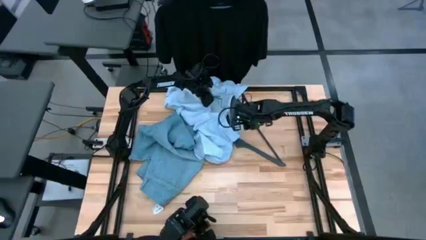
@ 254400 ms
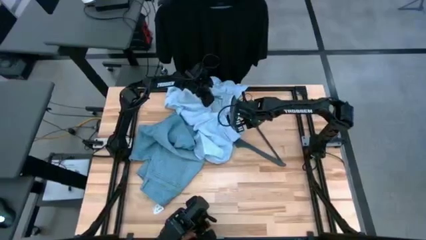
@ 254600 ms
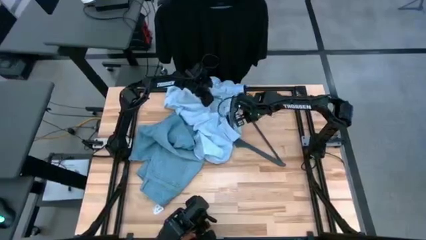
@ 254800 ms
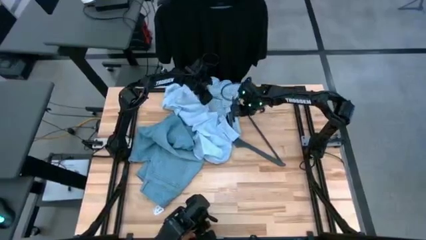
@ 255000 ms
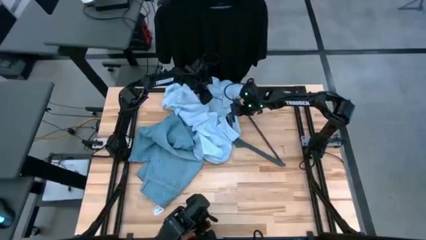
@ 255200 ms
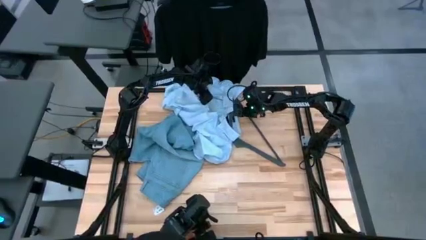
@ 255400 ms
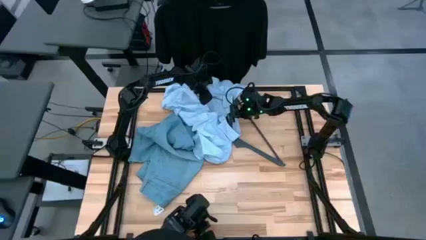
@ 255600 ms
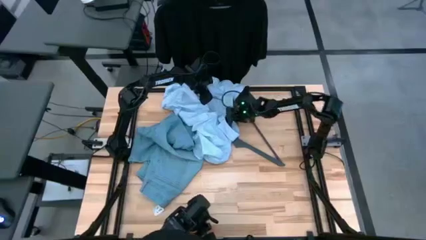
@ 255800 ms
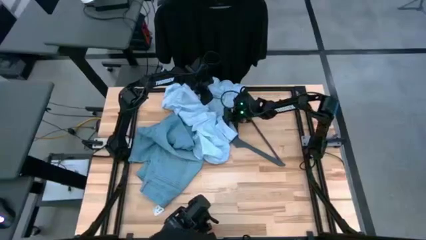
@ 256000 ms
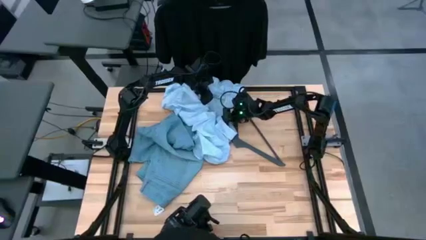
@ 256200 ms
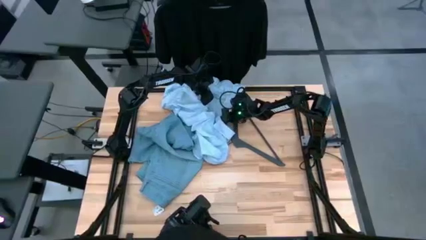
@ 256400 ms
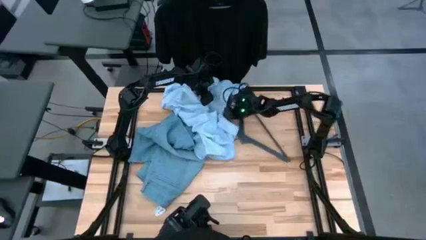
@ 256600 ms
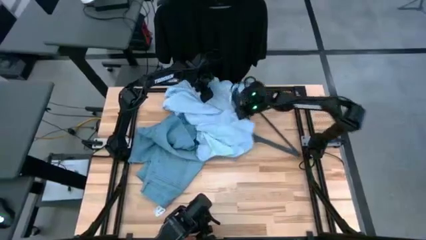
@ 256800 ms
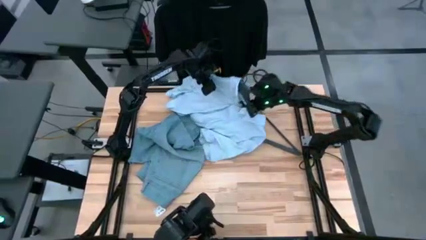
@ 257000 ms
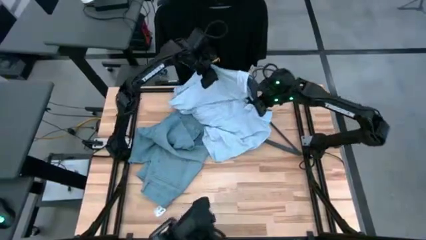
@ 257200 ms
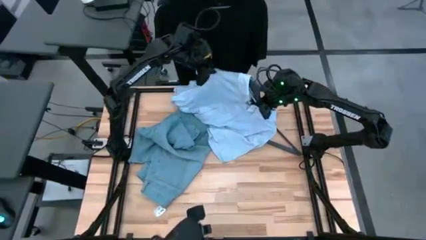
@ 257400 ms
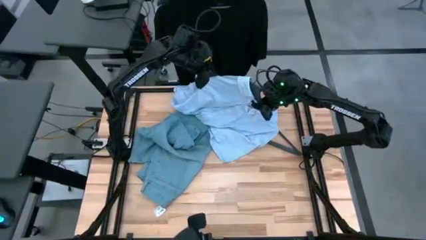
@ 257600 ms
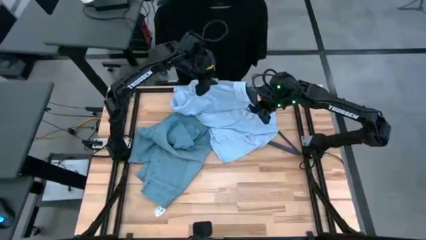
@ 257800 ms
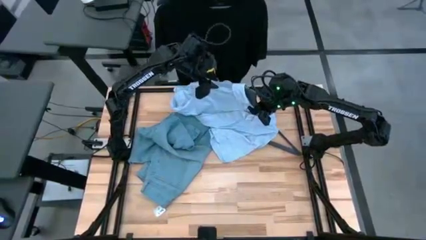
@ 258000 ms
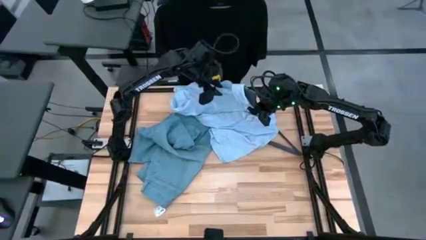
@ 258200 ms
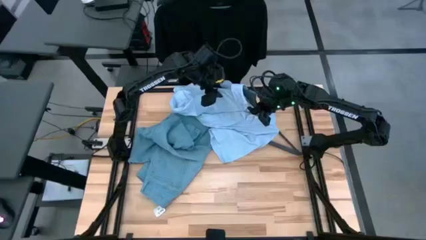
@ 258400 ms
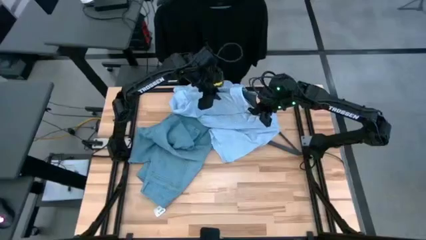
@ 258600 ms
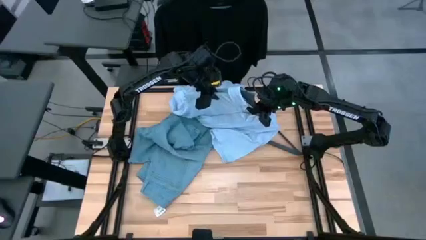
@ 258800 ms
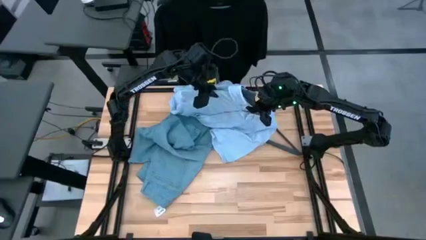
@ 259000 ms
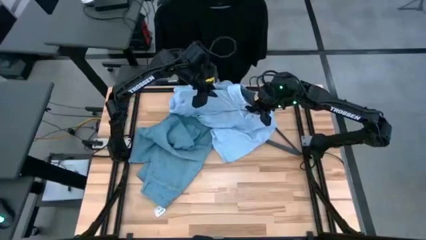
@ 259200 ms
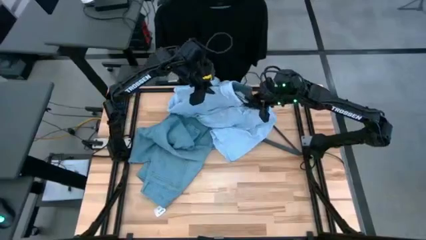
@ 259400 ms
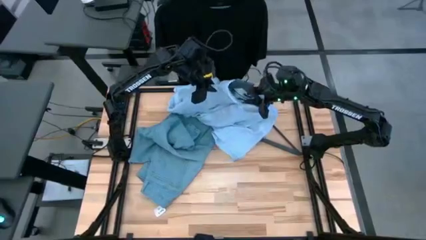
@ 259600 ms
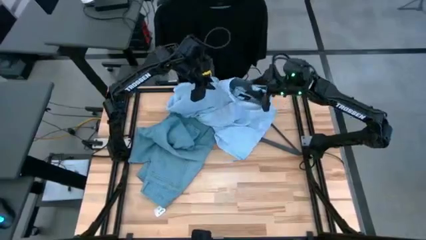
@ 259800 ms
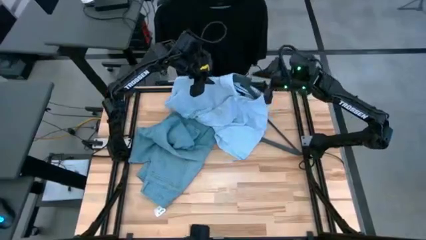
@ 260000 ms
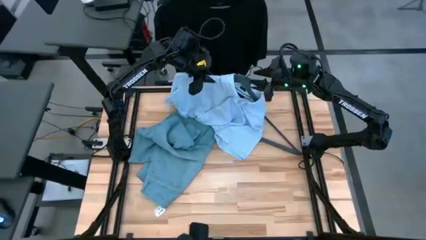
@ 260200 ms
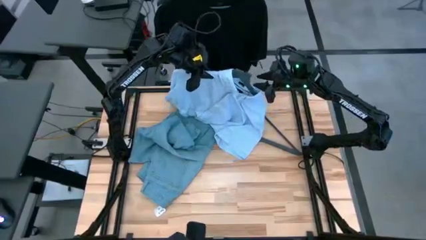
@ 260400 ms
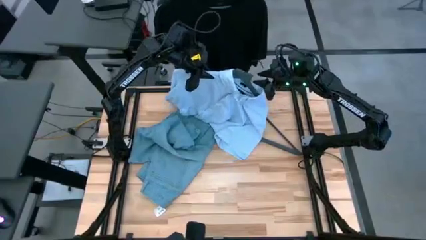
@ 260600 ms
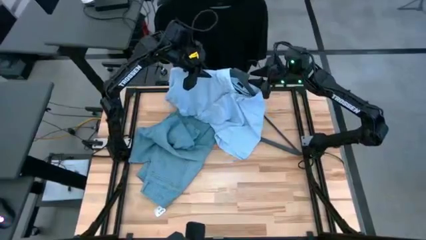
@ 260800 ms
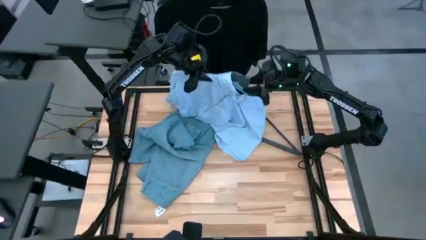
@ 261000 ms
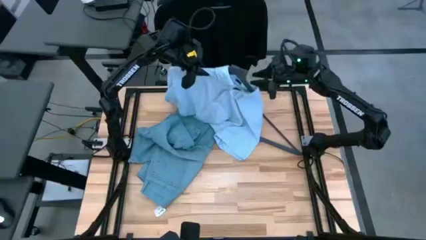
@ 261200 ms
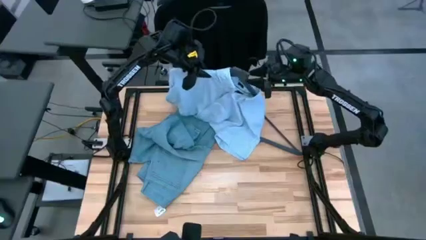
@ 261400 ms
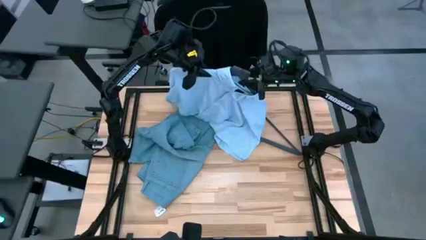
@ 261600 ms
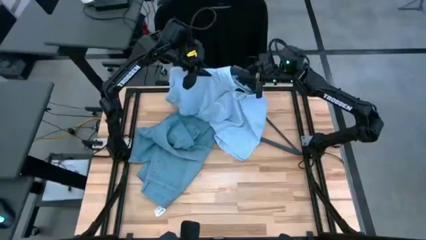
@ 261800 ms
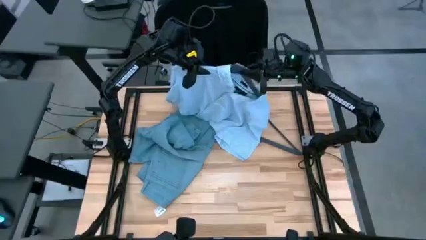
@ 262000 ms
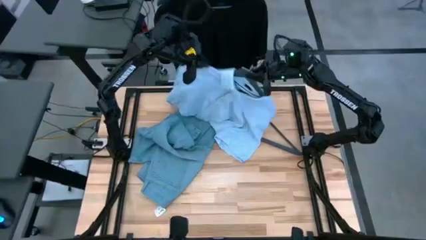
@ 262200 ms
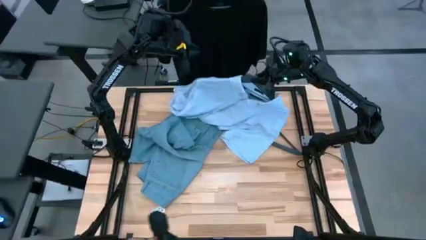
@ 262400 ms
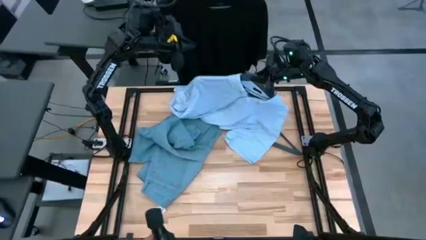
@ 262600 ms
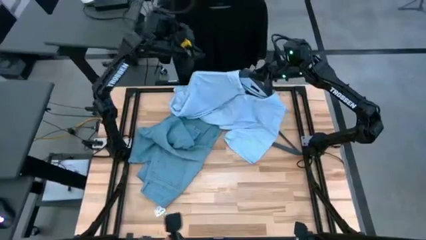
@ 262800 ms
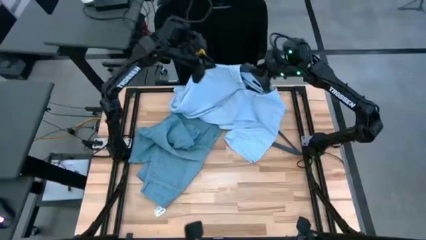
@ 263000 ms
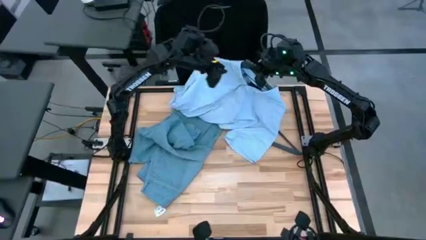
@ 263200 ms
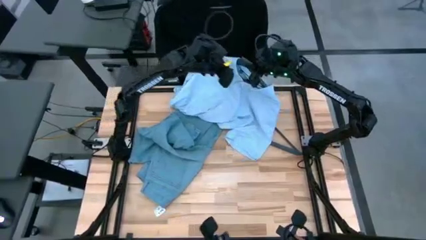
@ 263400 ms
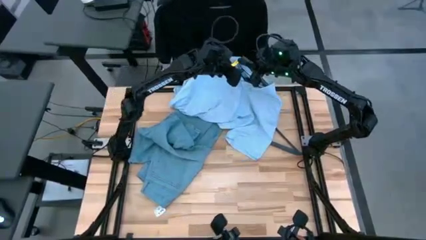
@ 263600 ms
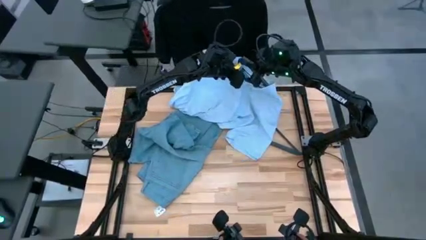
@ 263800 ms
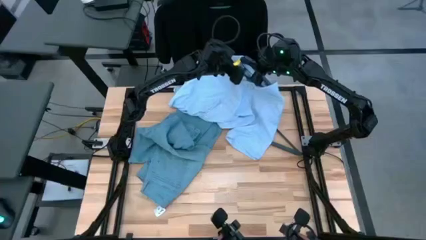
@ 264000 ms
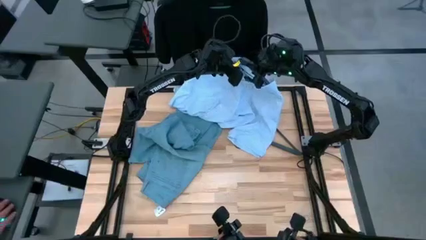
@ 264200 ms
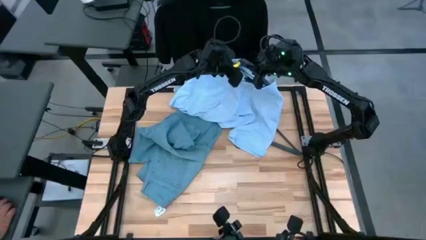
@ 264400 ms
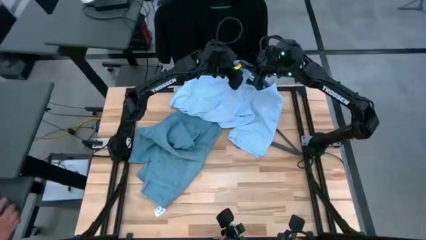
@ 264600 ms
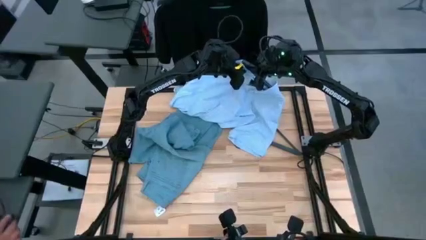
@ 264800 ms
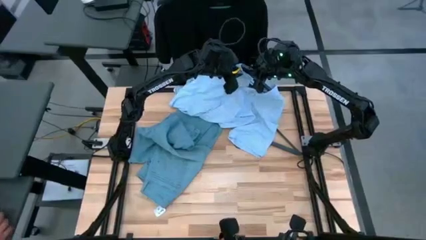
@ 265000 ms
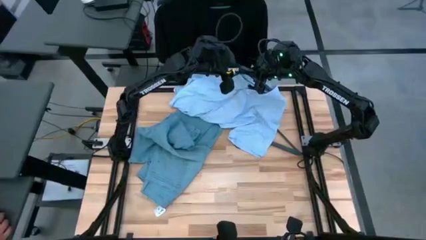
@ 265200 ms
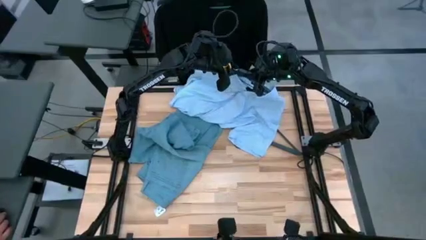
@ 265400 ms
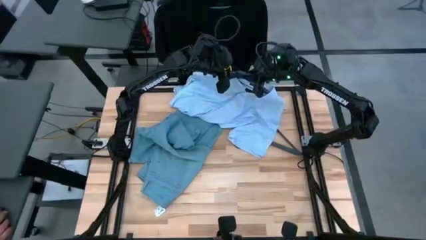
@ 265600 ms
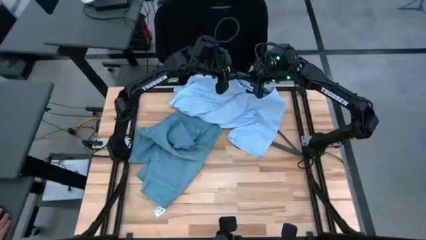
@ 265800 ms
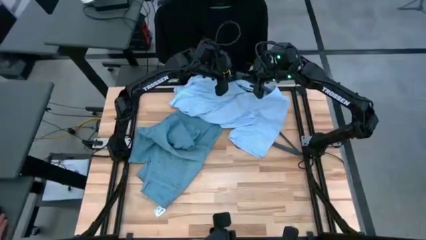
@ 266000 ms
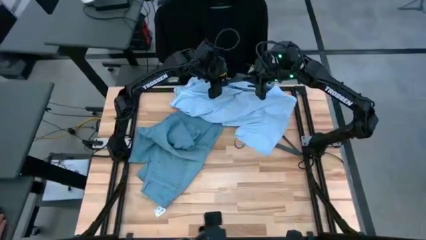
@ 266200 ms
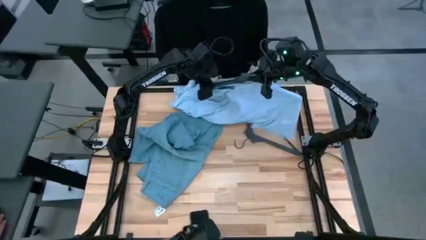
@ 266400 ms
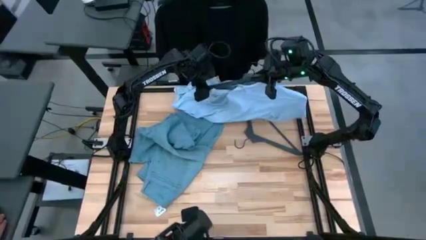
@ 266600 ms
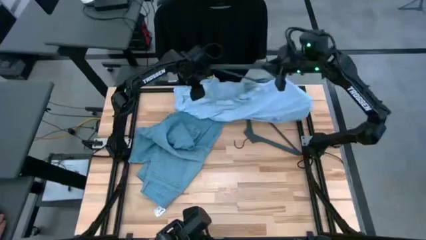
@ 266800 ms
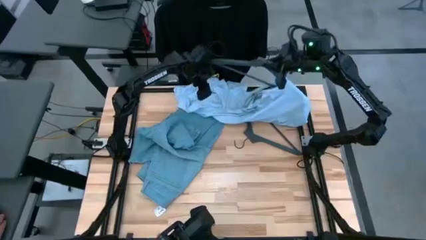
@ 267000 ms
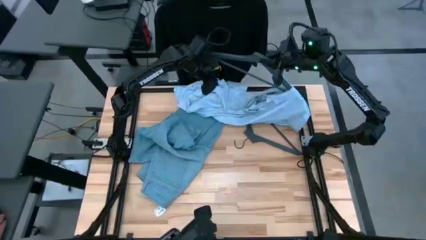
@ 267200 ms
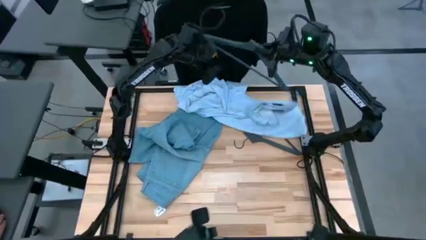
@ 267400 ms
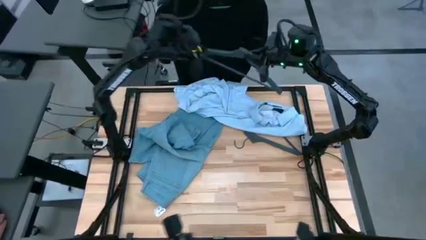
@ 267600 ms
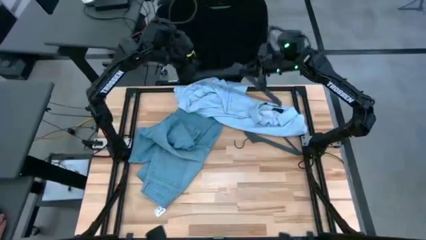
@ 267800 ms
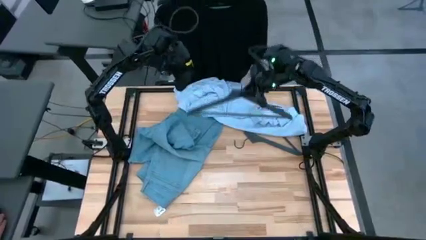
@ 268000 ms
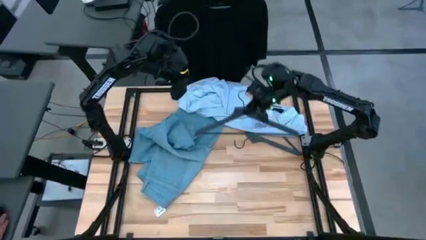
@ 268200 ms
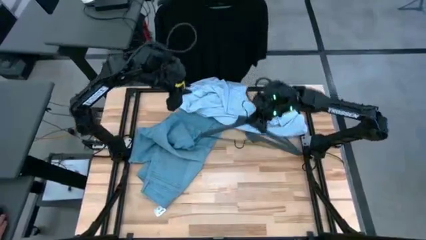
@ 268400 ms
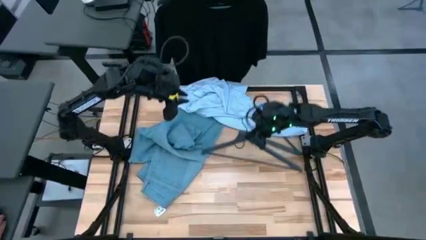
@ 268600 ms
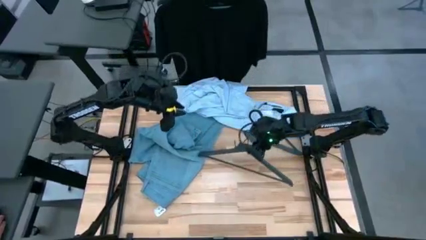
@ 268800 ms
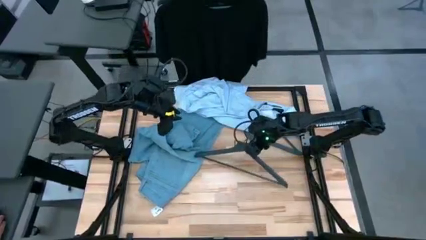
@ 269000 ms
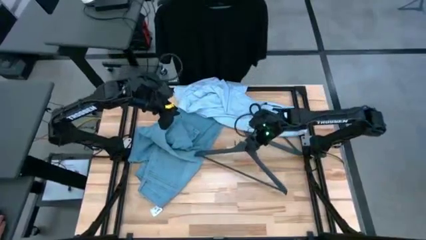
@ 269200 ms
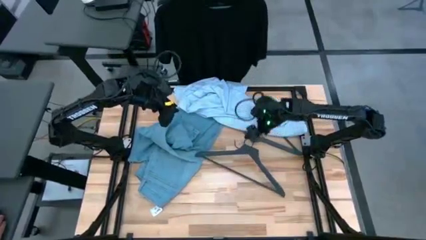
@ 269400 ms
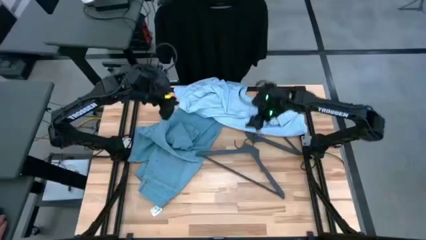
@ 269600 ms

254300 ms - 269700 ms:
Task: Hang clothes
Unhang the blue shirt from the rack

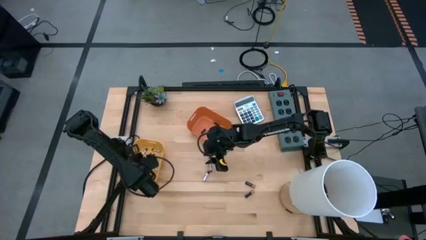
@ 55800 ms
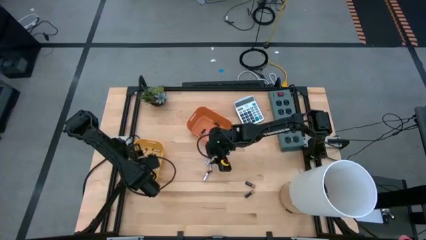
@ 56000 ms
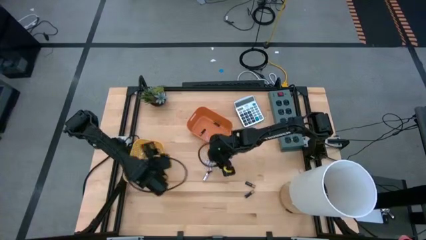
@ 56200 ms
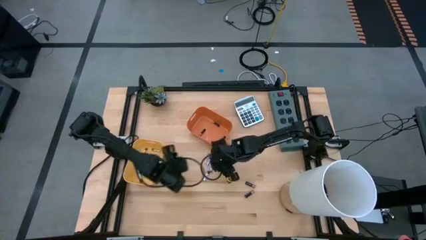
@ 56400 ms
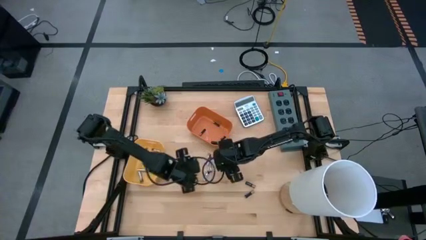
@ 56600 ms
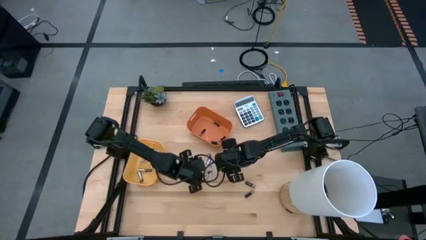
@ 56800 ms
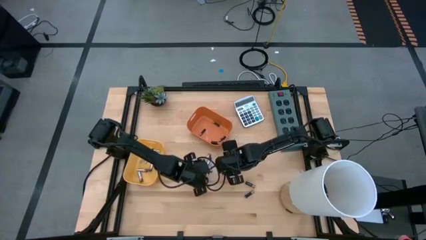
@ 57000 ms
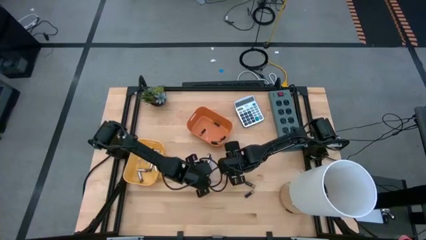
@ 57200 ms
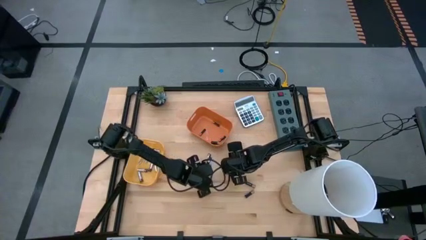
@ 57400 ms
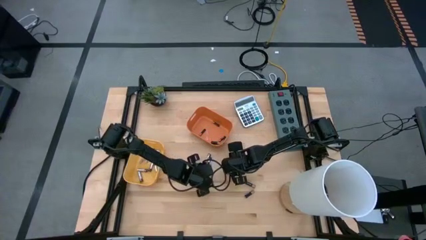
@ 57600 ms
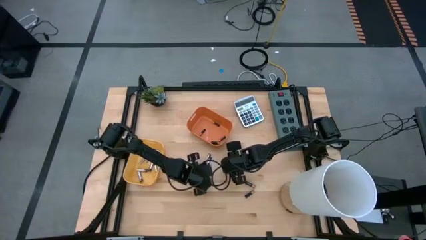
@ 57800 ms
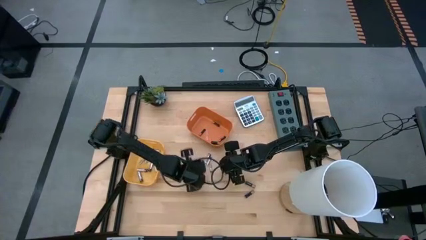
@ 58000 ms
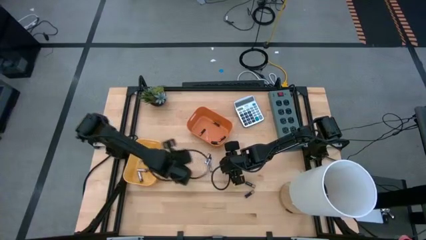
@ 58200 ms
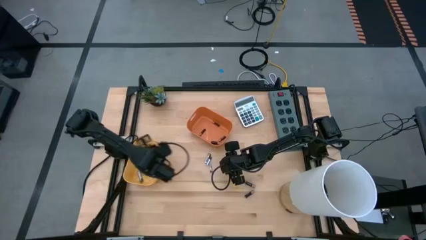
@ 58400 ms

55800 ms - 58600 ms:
Task: Sort batteries
Put the silver battery into the yellow bin
